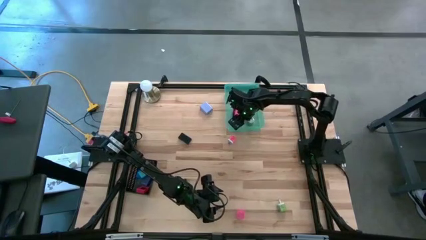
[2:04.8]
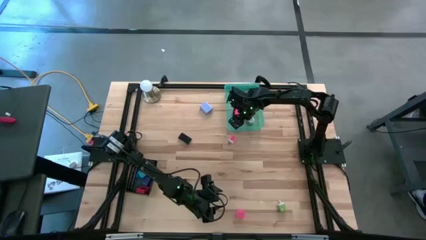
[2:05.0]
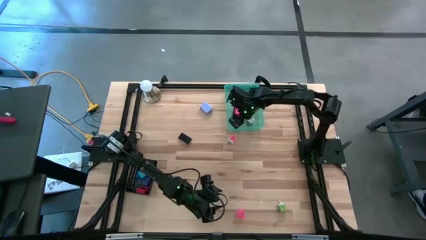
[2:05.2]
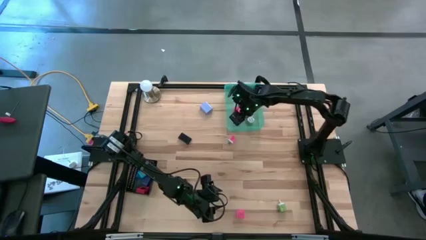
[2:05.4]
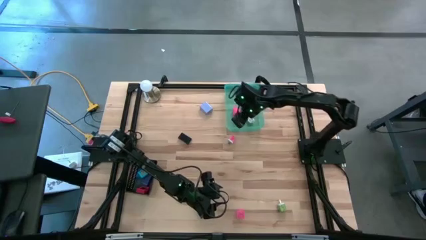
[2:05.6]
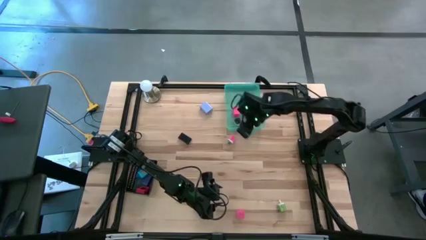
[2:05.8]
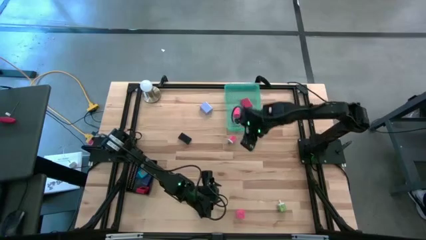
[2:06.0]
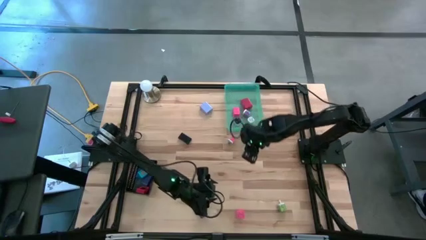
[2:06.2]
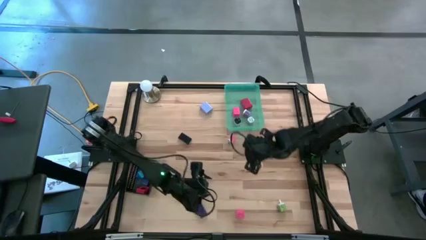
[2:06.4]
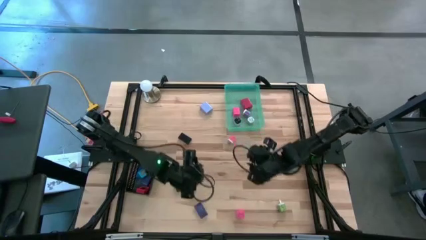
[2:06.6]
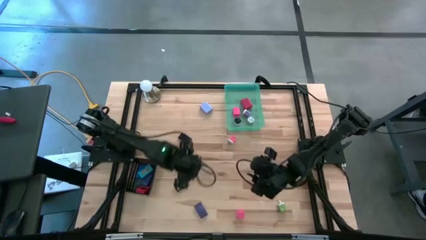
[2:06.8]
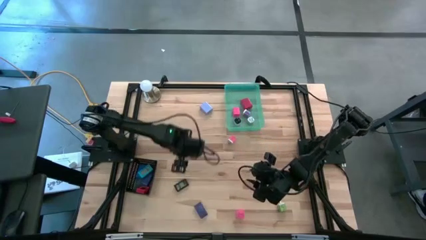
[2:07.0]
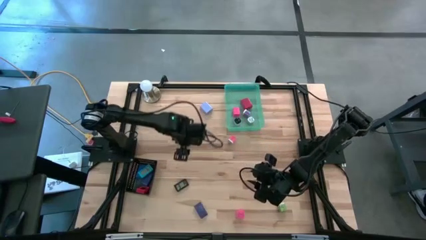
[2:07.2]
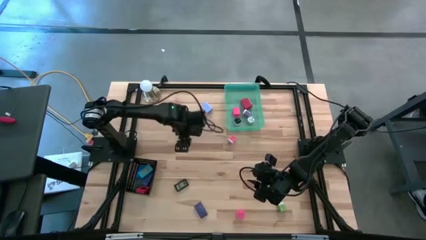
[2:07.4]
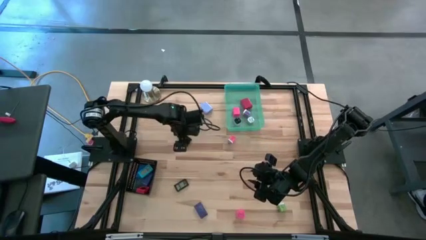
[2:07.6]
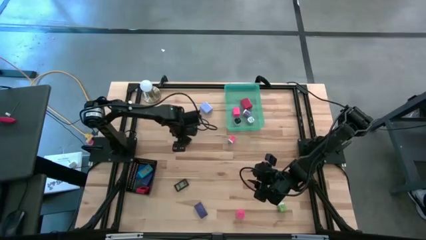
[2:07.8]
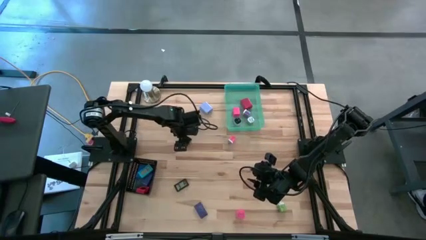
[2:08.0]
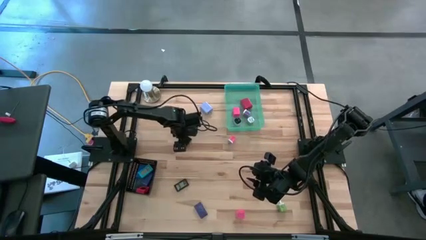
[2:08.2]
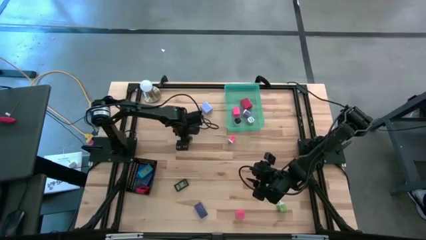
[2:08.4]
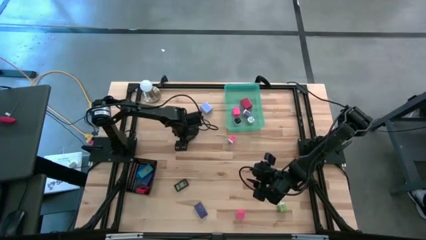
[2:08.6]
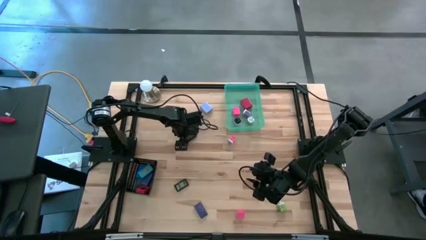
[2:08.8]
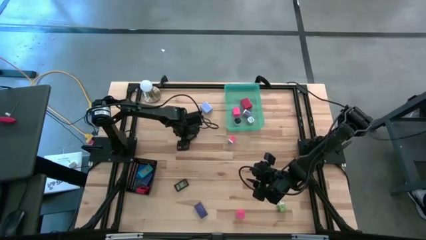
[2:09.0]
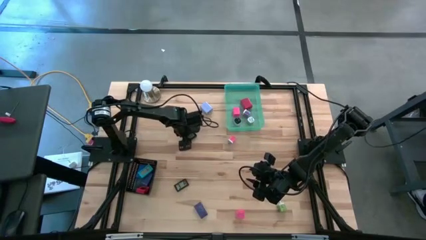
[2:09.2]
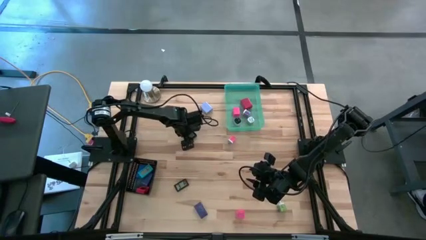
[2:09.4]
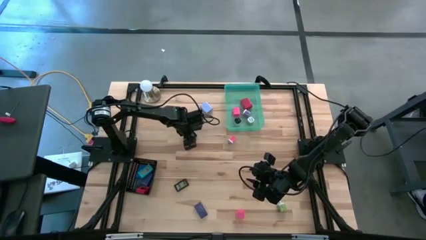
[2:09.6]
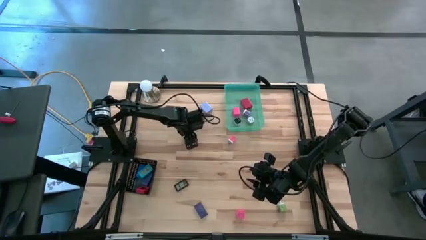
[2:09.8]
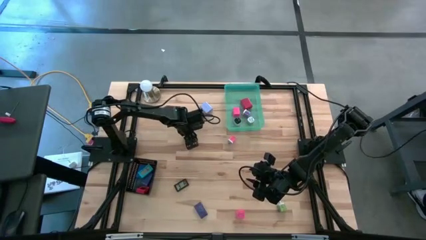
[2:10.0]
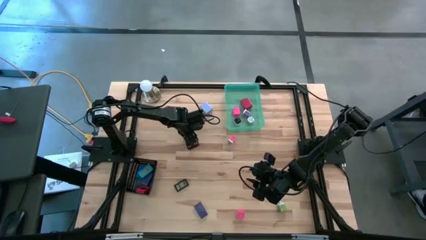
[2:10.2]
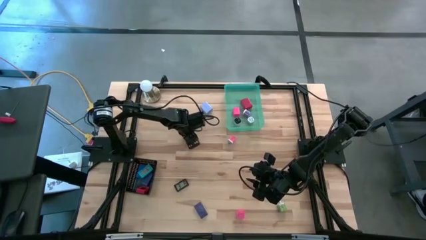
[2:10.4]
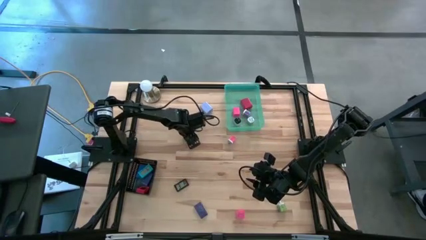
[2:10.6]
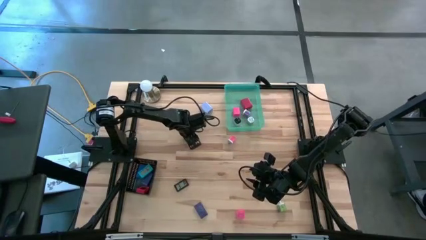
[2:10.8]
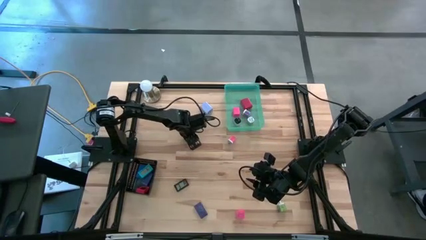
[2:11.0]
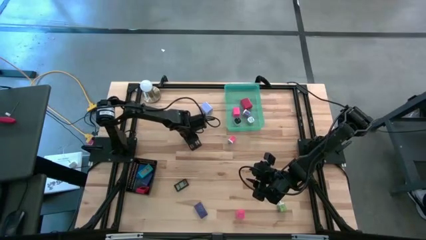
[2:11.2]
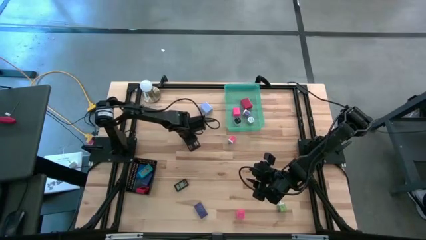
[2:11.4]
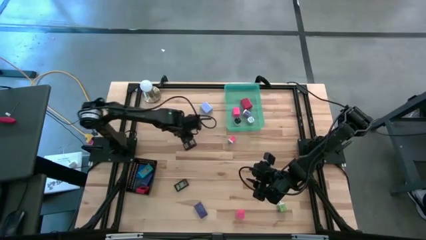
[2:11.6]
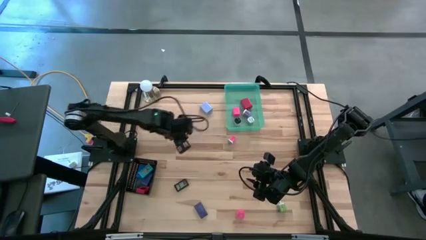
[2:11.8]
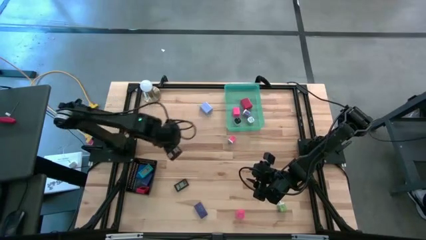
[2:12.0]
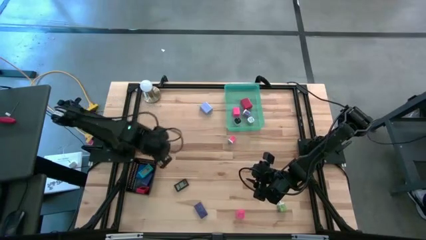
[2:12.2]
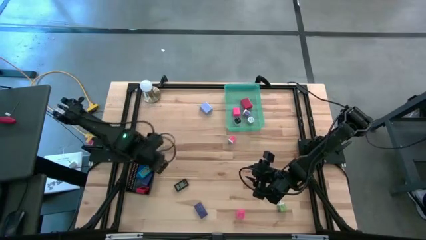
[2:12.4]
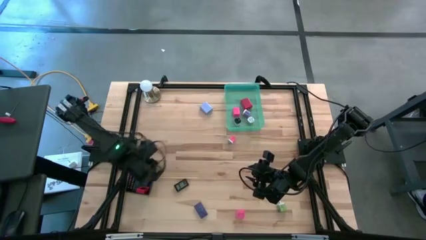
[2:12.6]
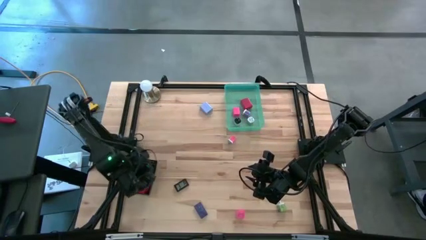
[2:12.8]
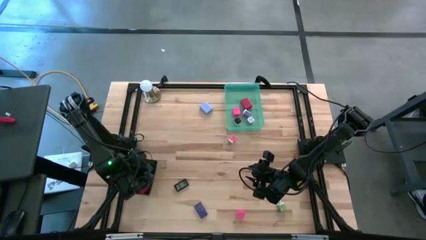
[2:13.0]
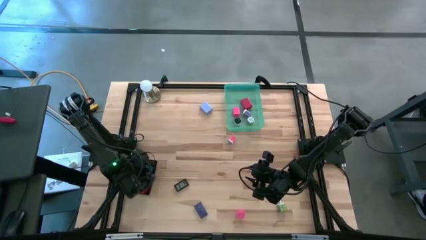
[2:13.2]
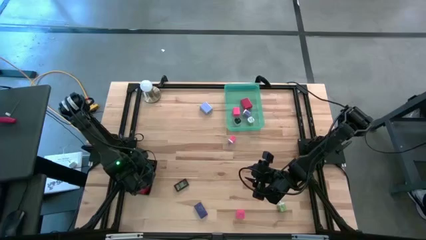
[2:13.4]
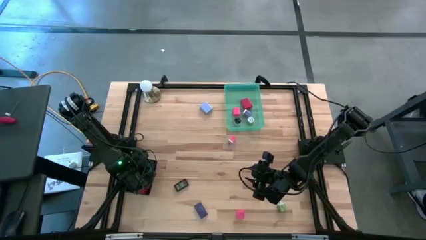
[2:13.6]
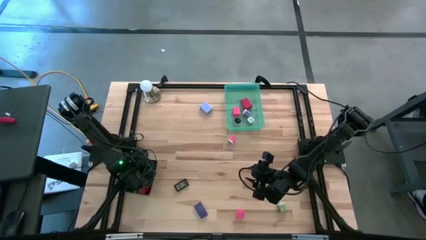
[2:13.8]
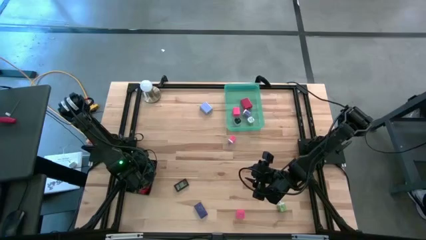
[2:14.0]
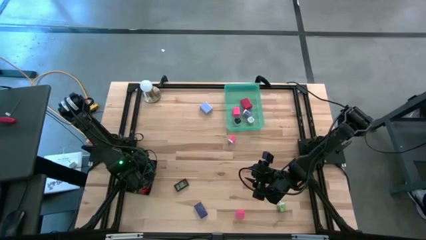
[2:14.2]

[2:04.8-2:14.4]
Task: Pick & Place Office items
Put the top black digital timer into the black bin

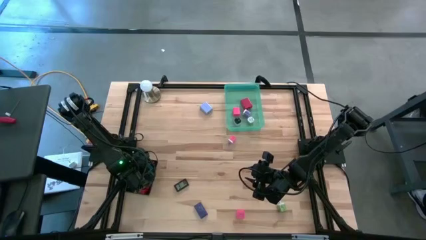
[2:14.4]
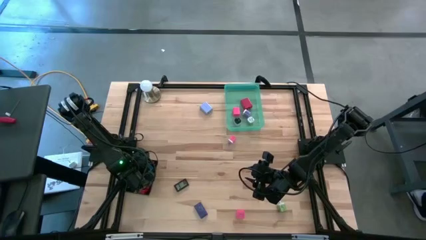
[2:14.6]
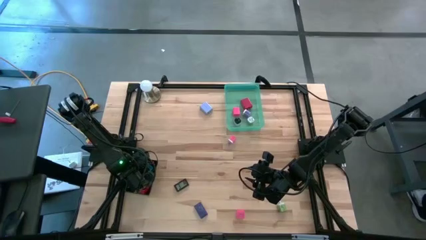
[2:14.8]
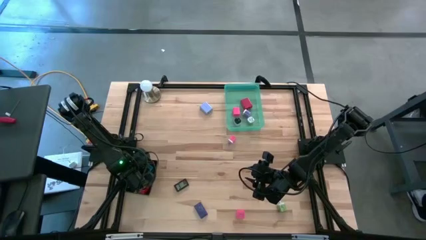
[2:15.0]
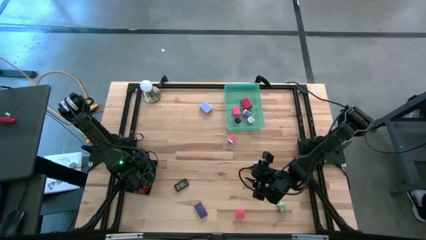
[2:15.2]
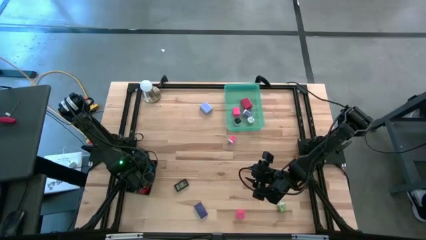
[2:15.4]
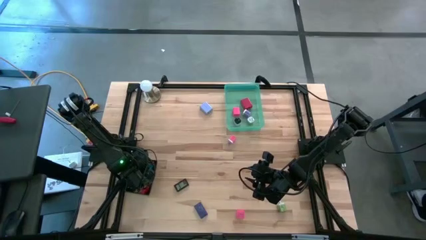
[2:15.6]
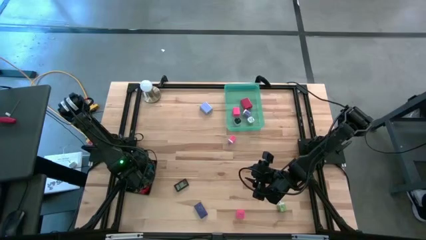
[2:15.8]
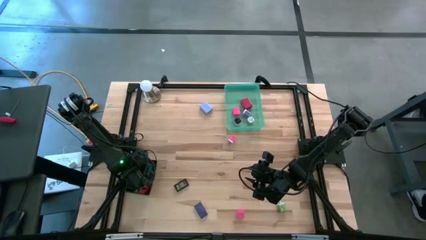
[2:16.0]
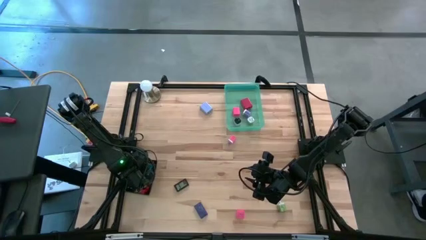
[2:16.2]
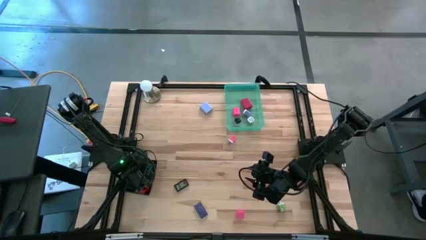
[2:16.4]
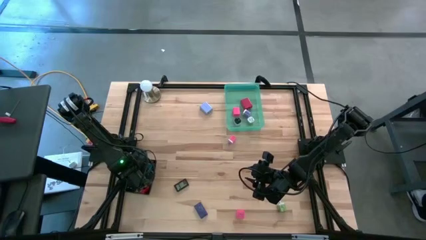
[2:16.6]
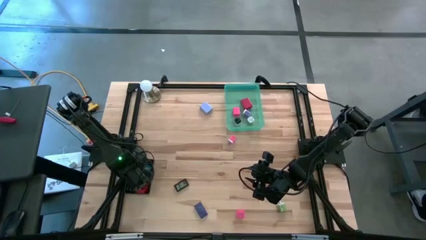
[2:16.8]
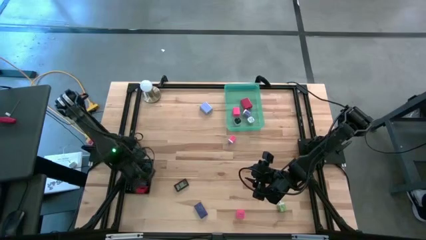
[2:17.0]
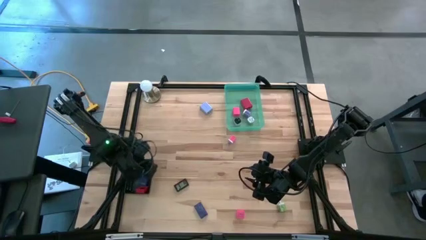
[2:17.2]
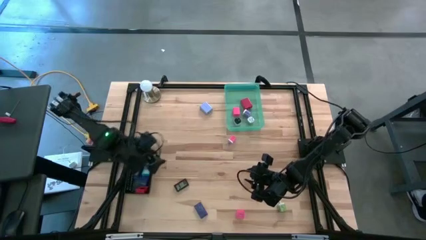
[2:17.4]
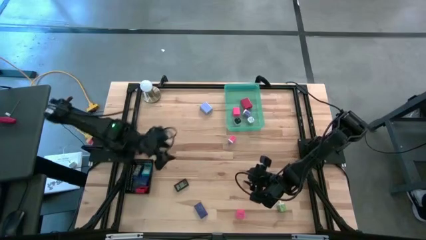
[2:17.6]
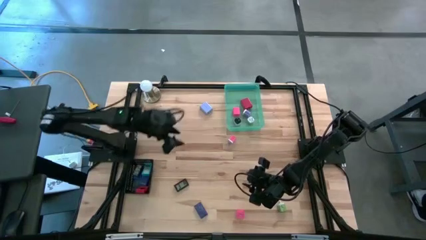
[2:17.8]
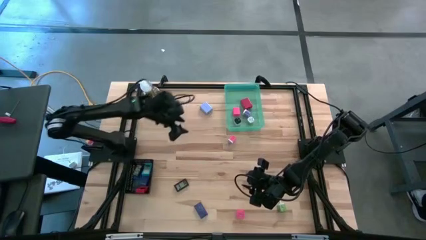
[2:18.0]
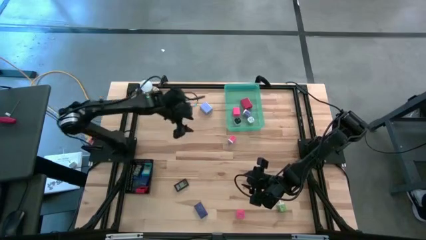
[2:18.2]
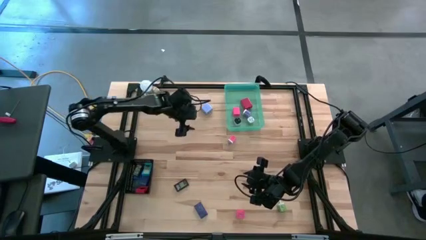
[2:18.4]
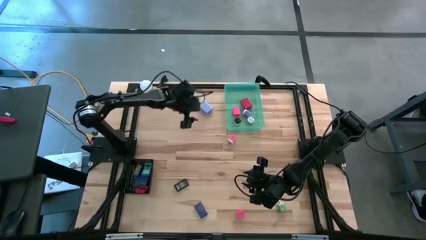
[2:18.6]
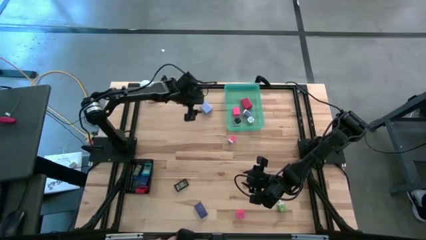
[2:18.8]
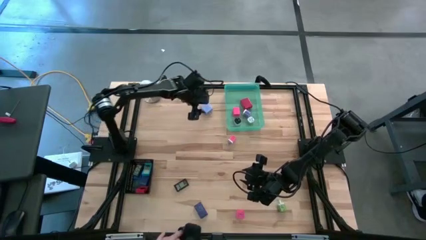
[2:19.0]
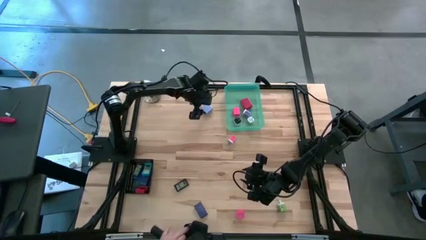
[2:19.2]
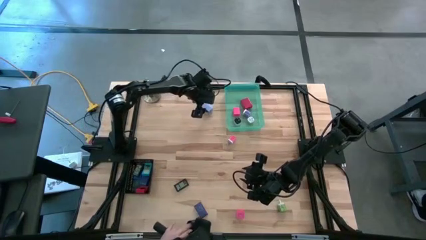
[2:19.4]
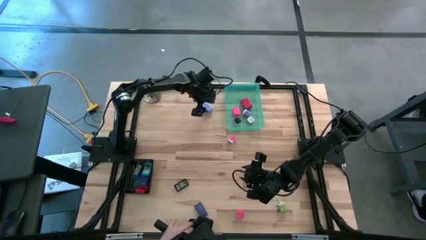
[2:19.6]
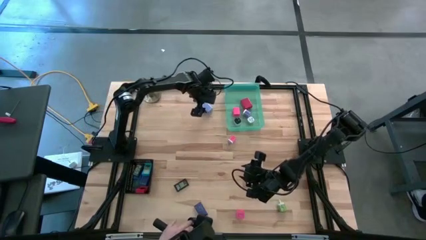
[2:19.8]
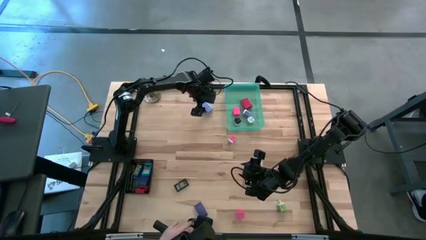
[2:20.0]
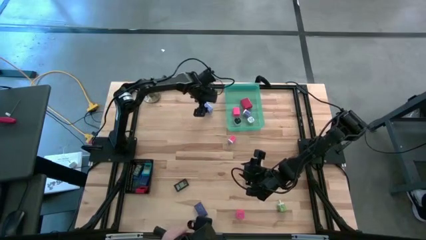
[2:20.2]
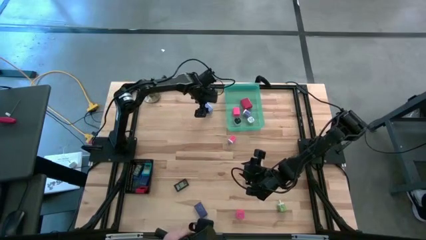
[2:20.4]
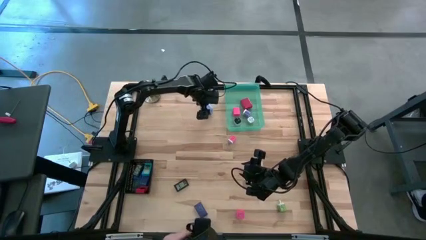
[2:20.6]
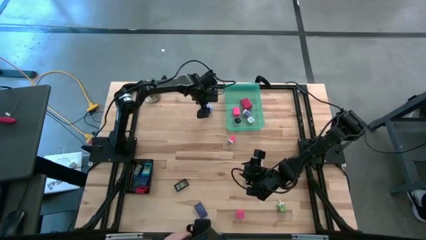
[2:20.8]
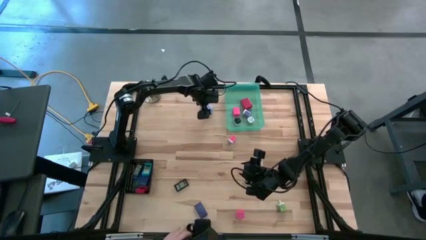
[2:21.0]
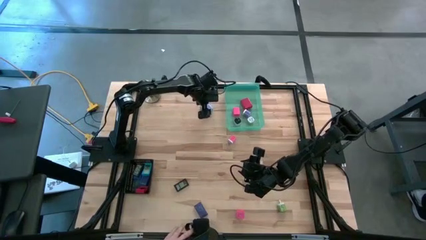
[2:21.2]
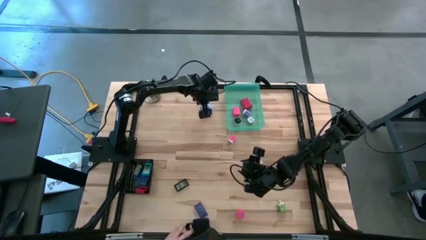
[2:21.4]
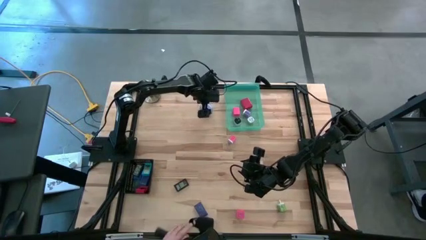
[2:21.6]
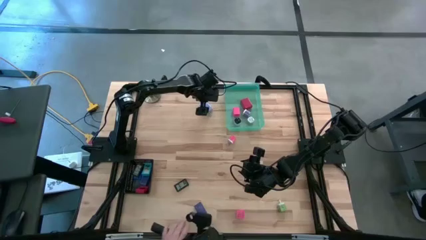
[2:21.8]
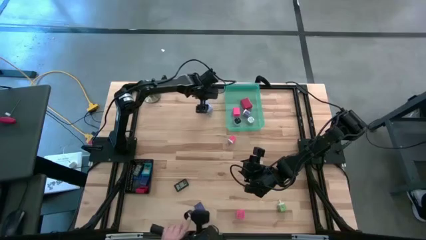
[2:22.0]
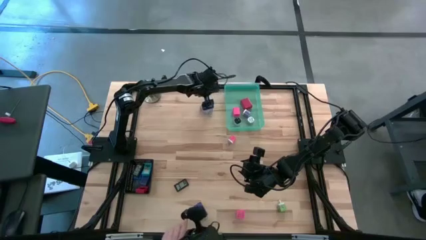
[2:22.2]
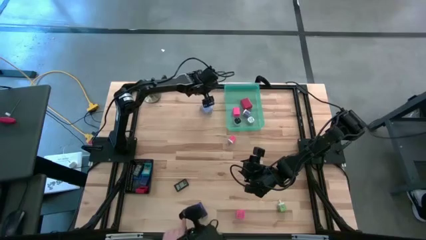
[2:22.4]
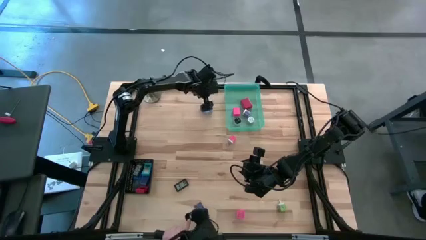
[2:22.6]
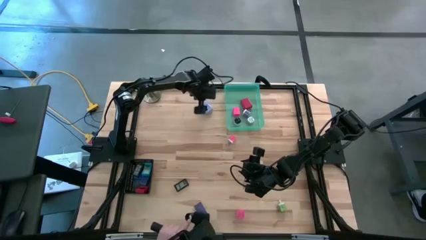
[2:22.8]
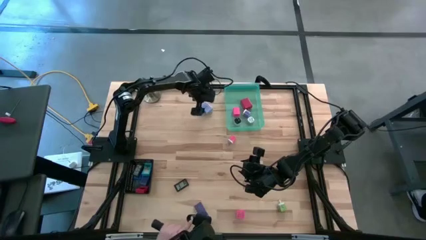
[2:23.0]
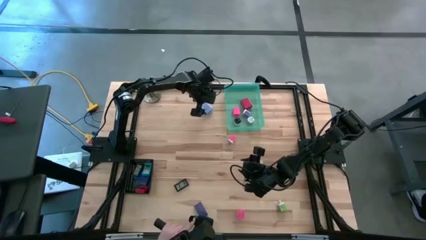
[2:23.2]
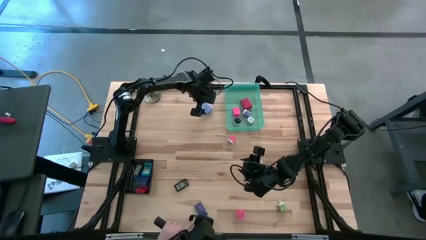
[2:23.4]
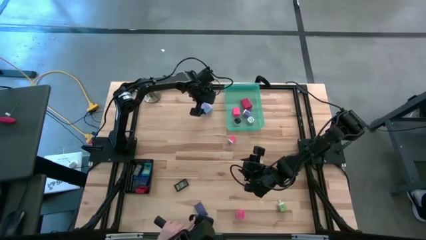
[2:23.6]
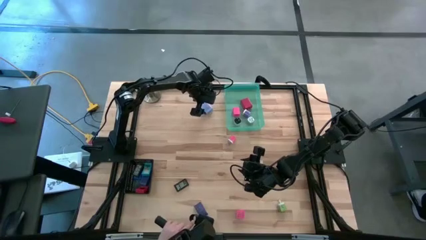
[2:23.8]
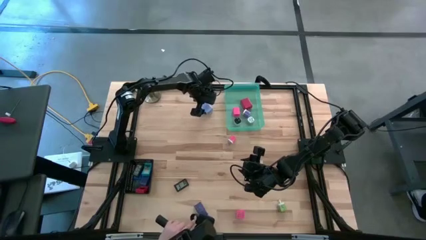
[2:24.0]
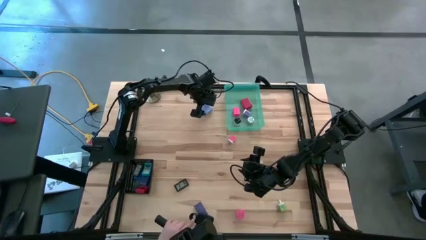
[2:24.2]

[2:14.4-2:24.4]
Put the purple charger adapter into the green bin
